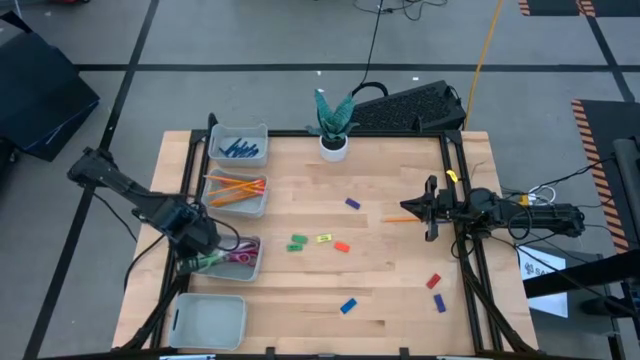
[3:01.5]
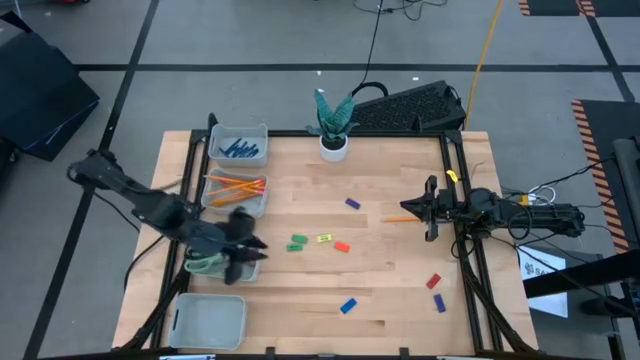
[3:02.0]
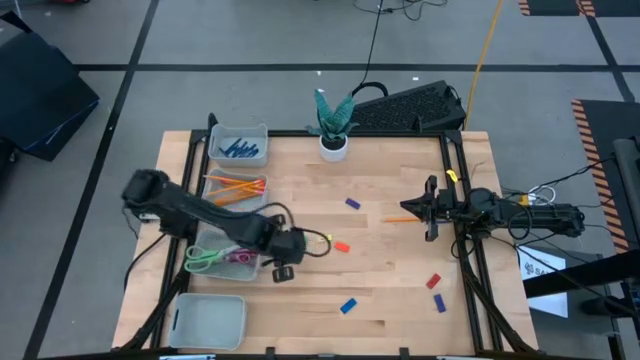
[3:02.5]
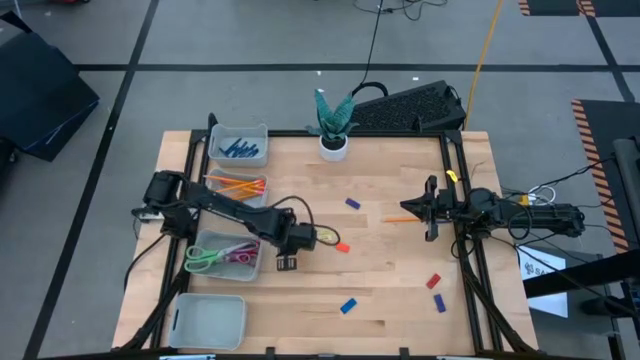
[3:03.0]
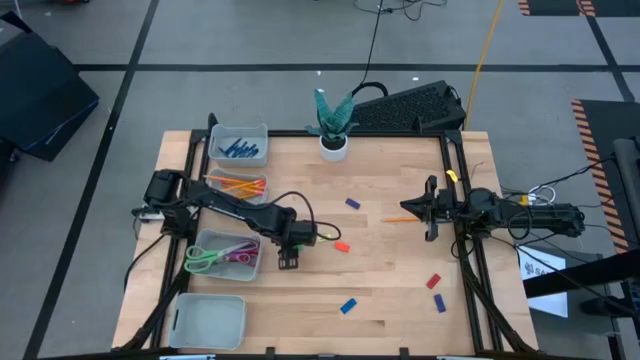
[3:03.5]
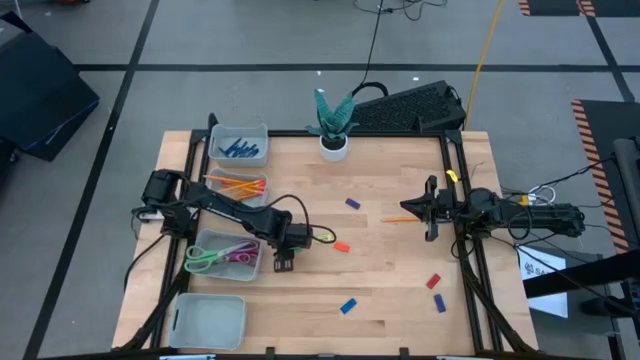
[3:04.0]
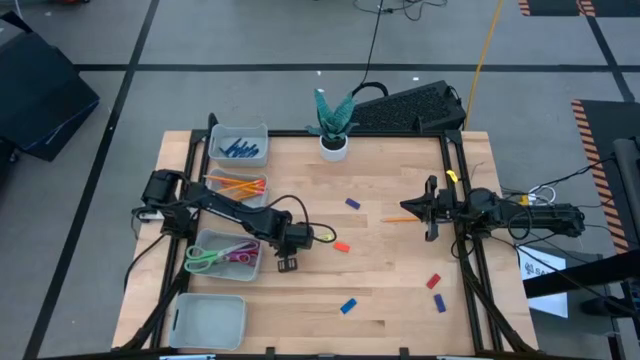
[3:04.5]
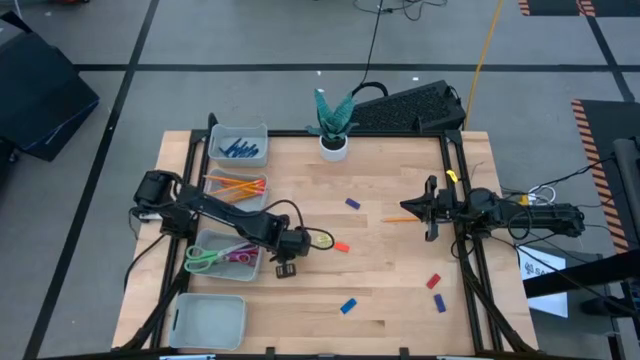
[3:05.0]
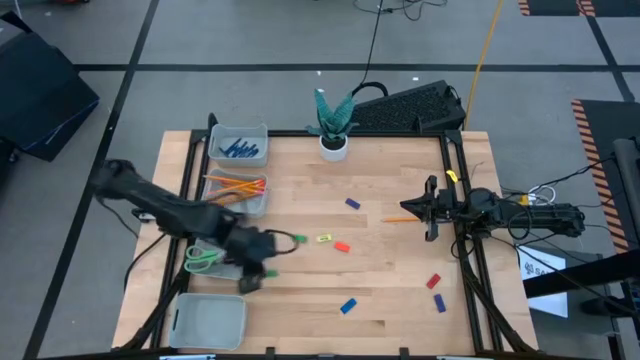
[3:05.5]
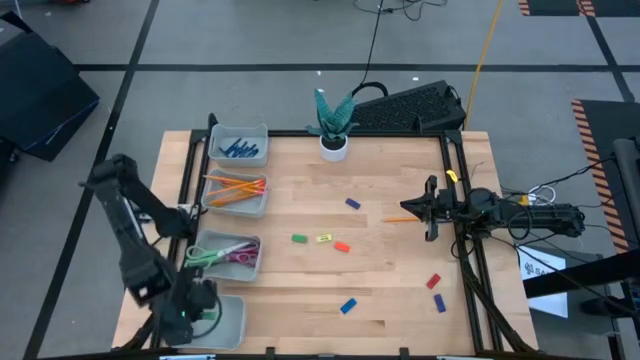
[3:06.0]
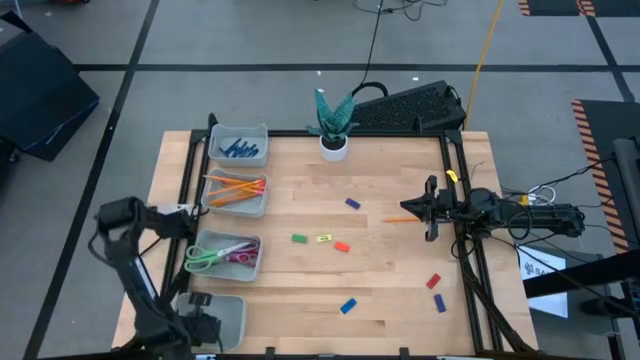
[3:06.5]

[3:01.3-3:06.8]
Task: Sort crayons/erasers/pens/pencils in bins
Put the green eraser into the bottom

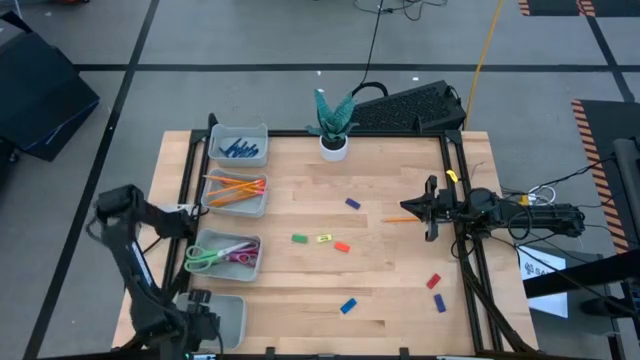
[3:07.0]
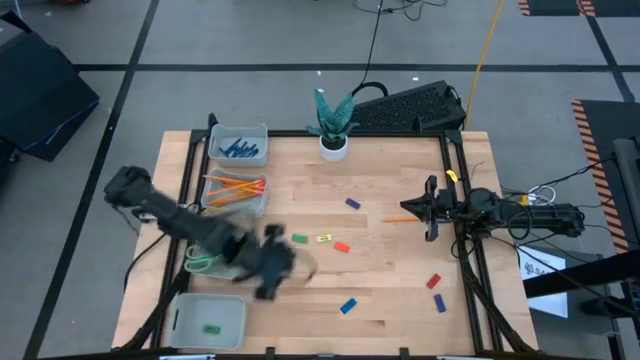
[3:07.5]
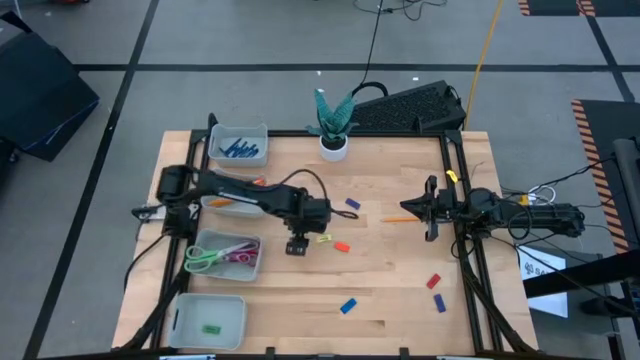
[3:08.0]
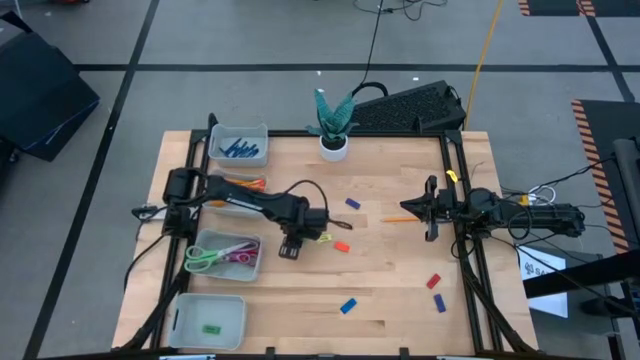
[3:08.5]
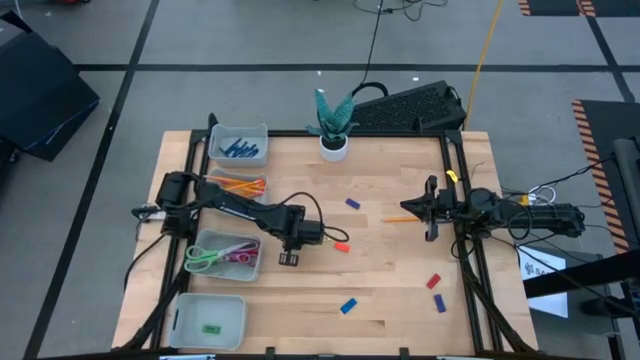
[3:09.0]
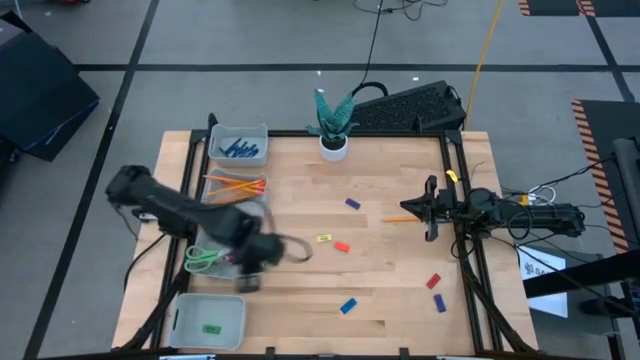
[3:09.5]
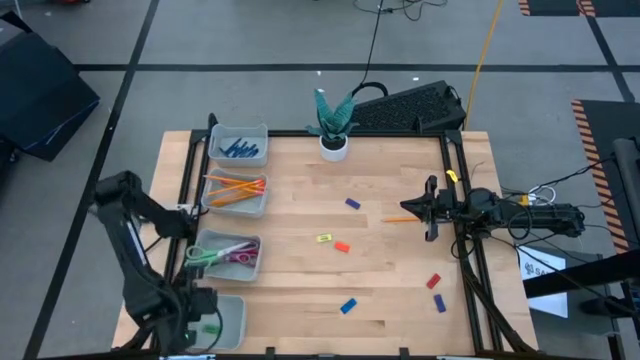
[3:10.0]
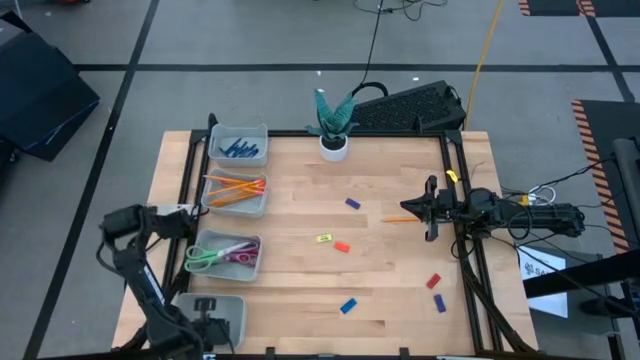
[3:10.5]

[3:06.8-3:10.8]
Put the green eraser into the bottom

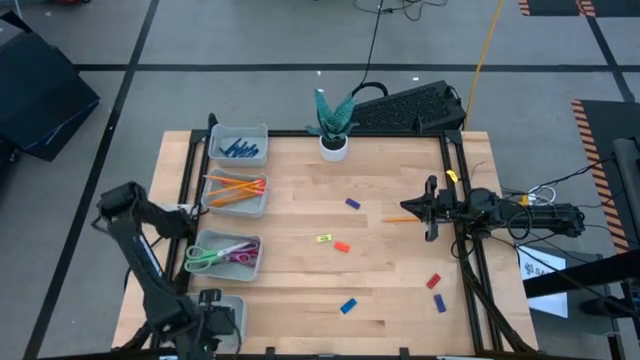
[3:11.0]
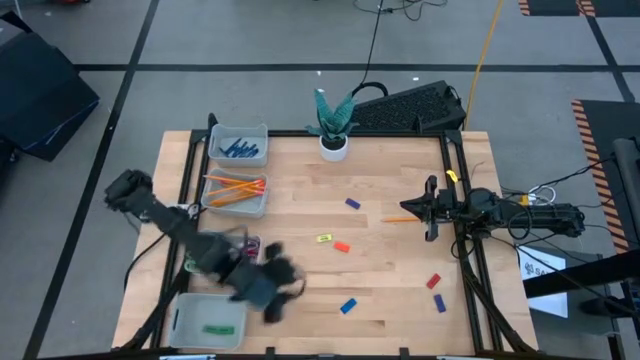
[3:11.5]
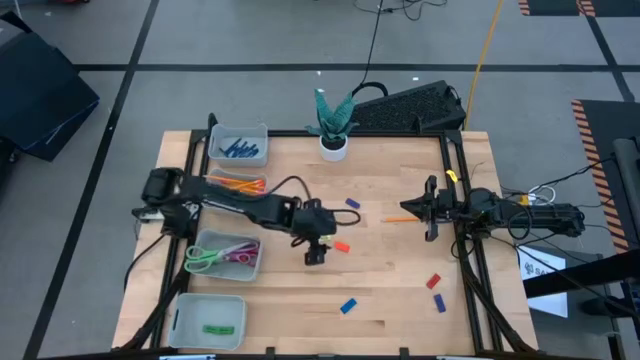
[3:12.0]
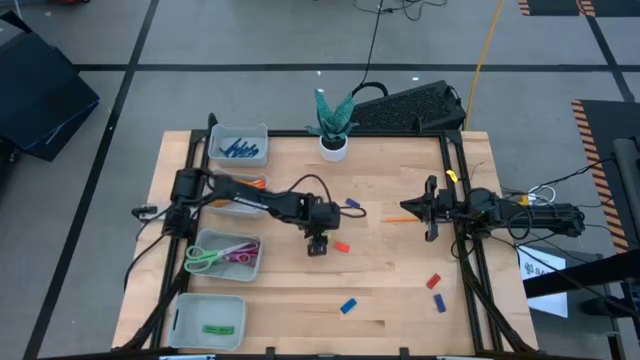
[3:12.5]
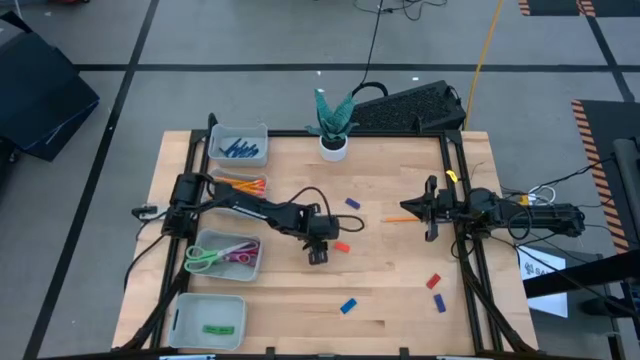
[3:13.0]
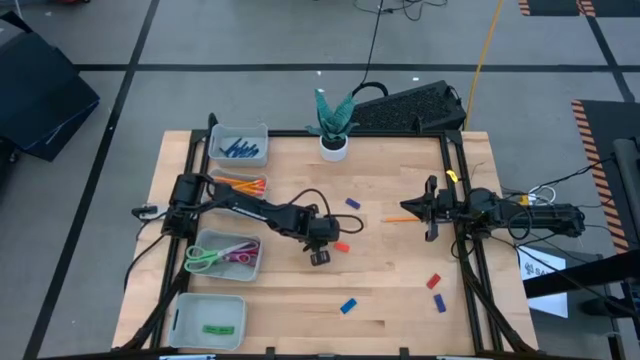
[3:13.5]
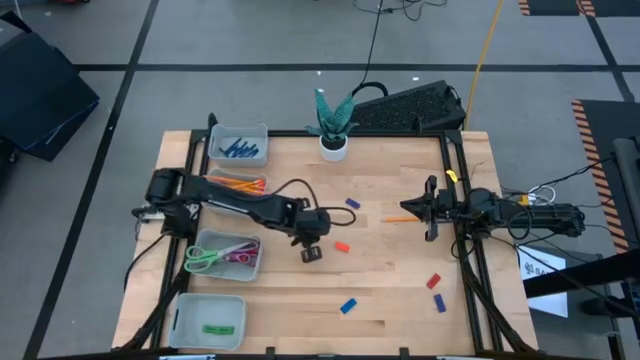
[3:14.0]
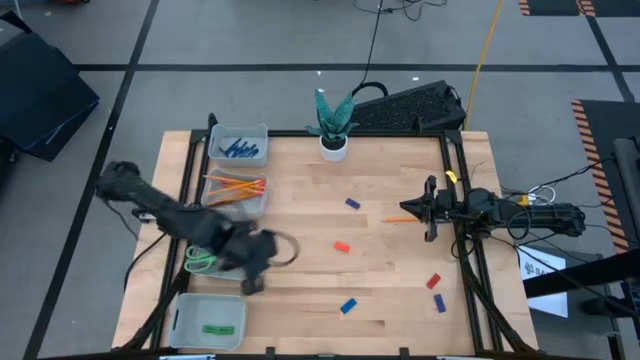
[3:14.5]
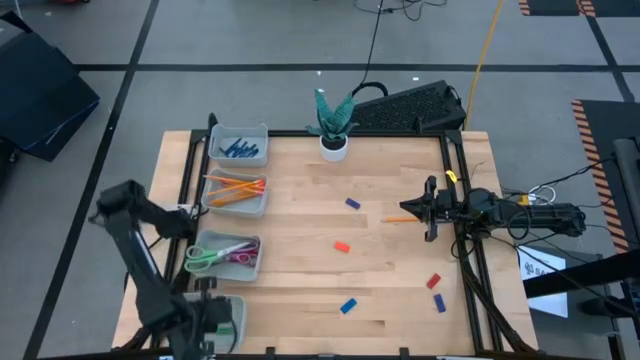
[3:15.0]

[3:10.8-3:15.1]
Put the yellow eraser into the bottom

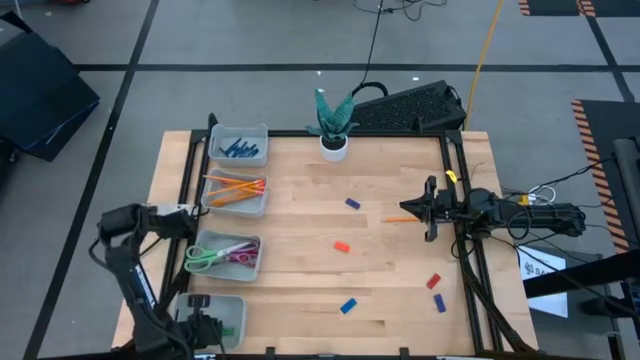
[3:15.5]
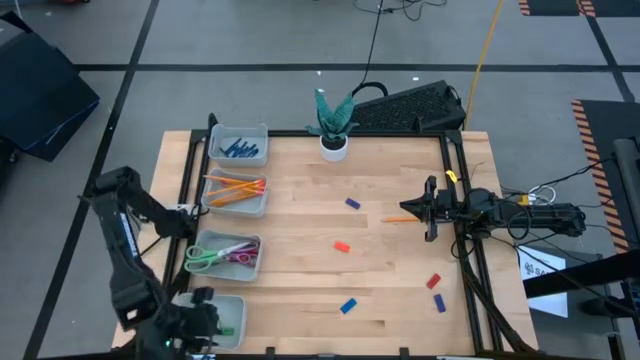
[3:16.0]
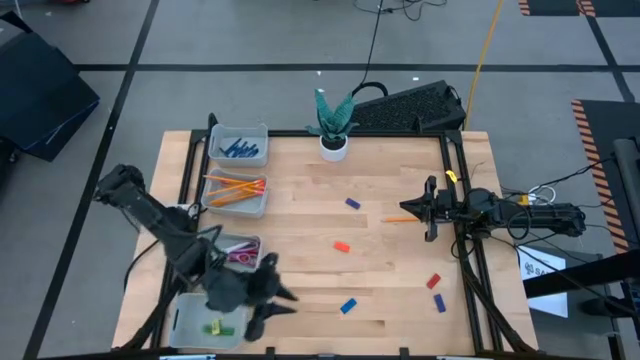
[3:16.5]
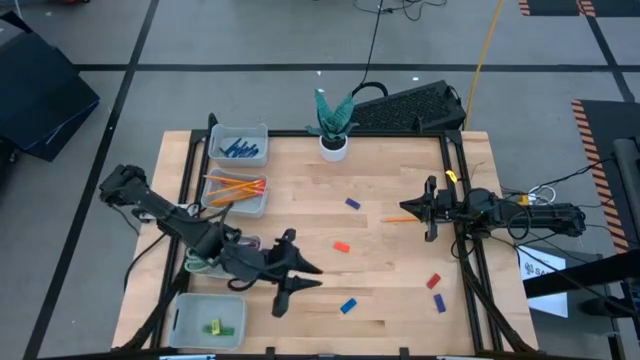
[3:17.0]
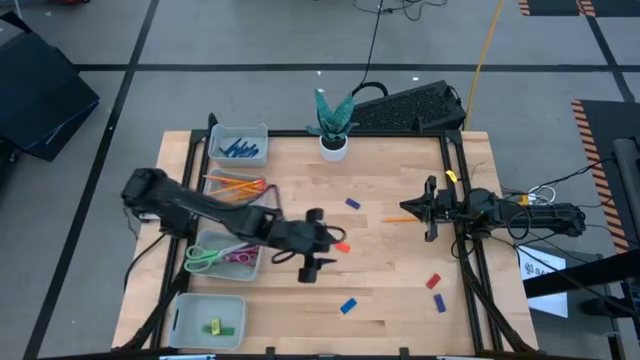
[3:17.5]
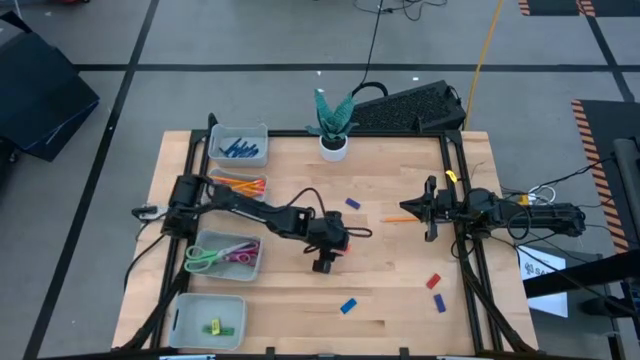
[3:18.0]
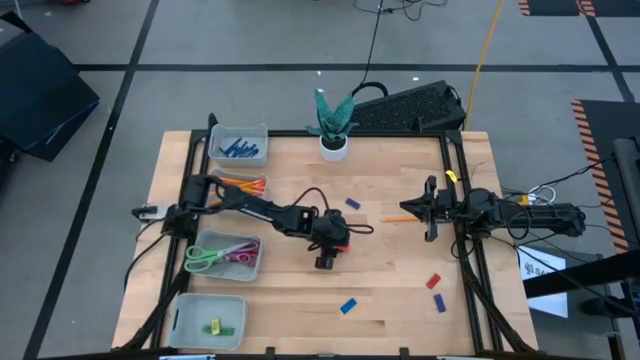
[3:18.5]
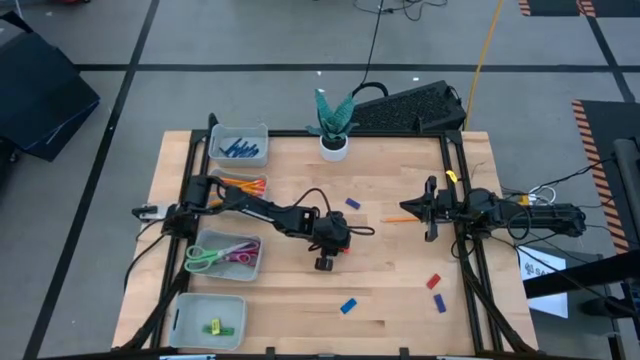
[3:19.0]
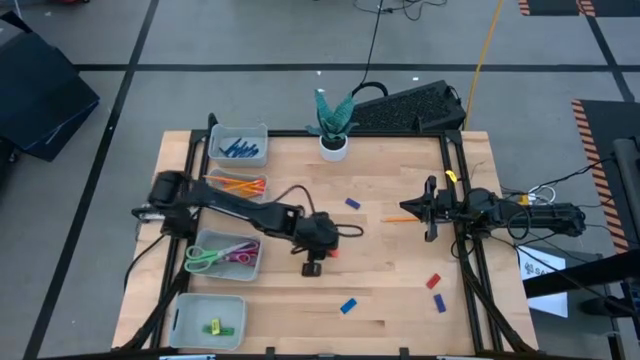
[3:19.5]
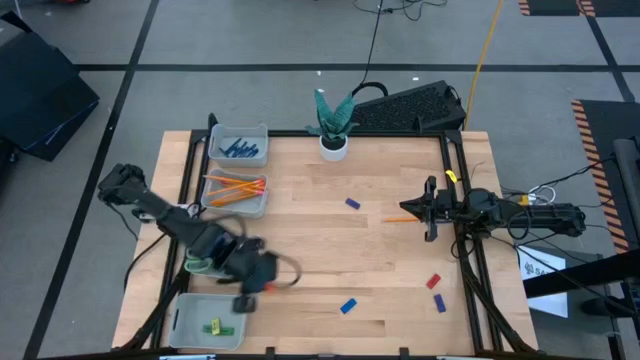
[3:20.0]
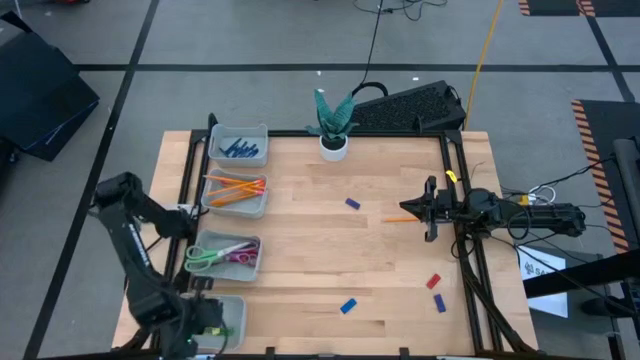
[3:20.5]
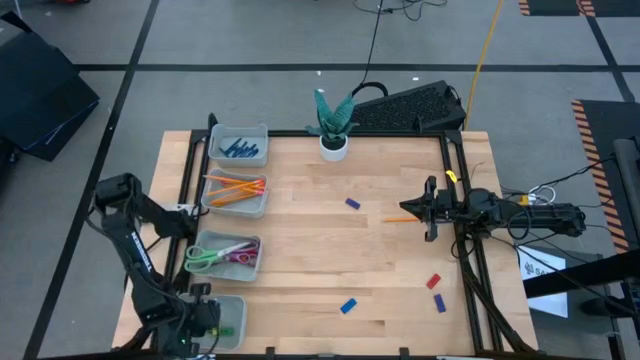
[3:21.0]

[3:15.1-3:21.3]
Put the orange eraser into the bottom
